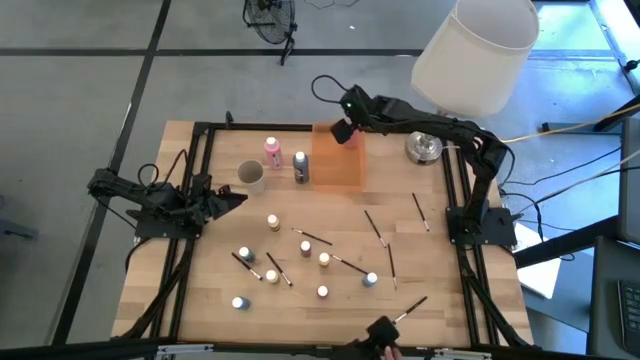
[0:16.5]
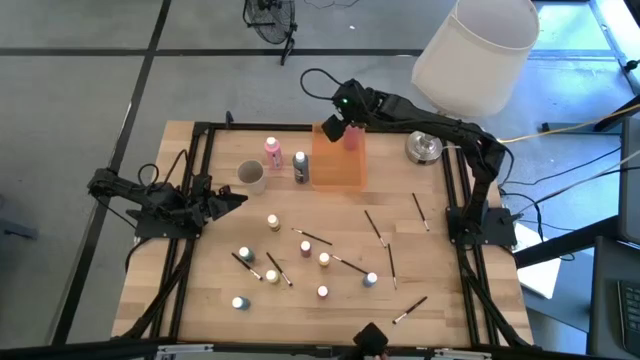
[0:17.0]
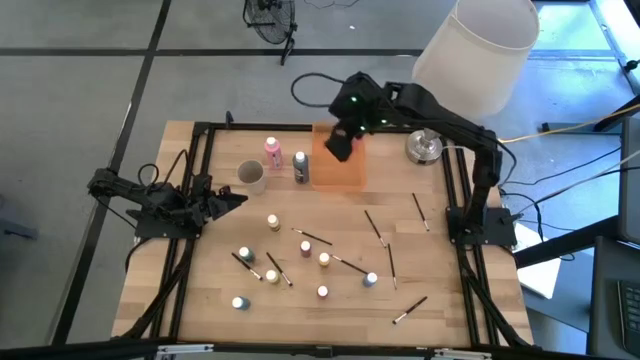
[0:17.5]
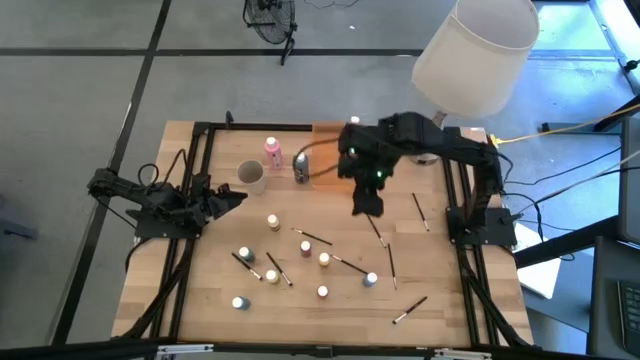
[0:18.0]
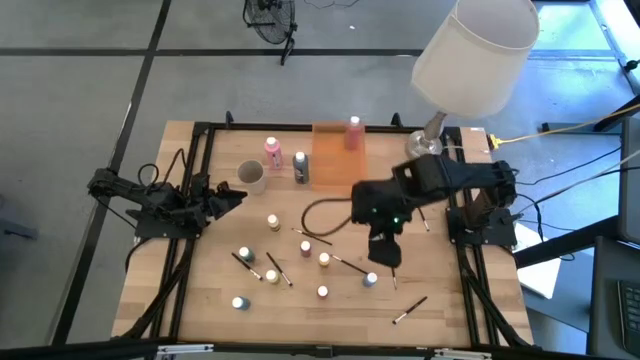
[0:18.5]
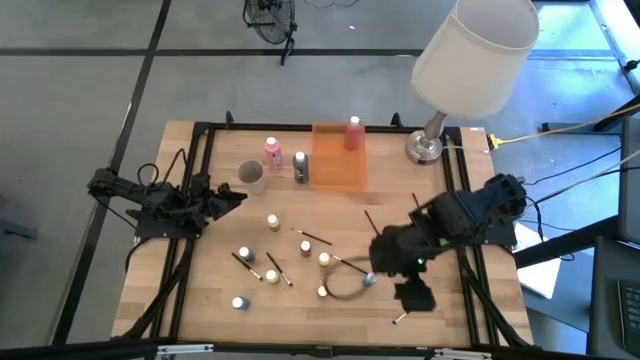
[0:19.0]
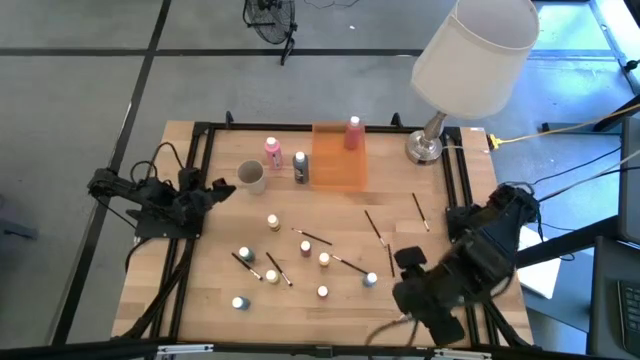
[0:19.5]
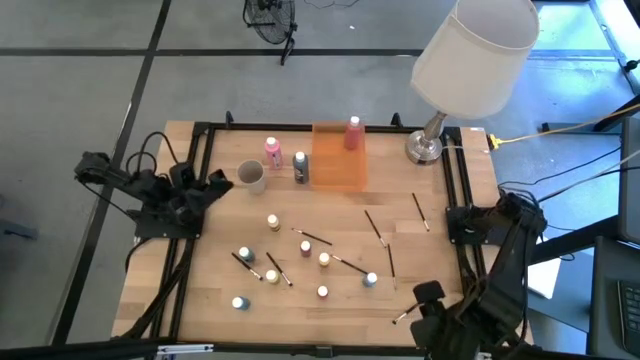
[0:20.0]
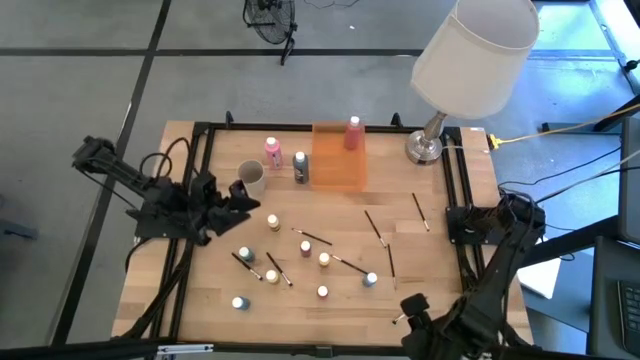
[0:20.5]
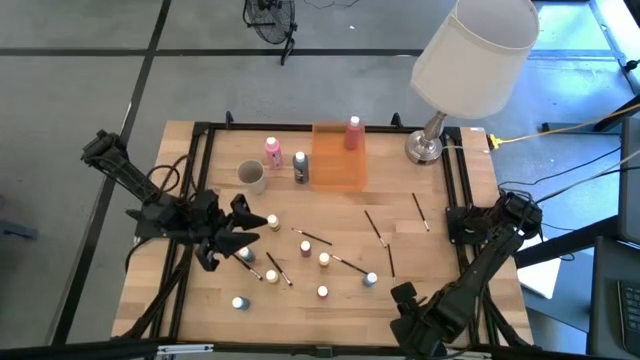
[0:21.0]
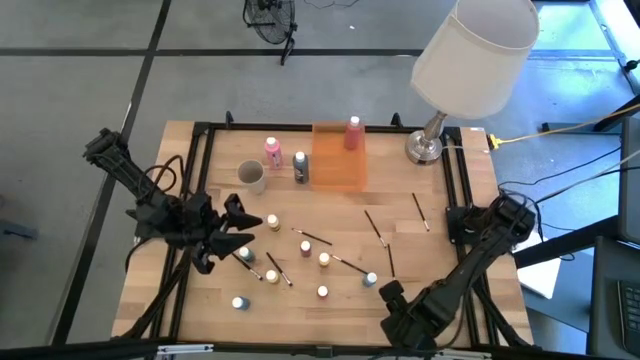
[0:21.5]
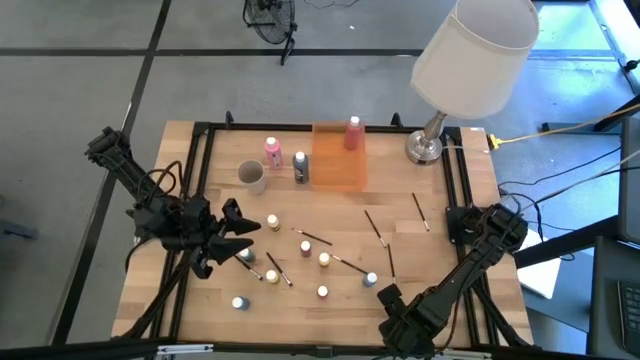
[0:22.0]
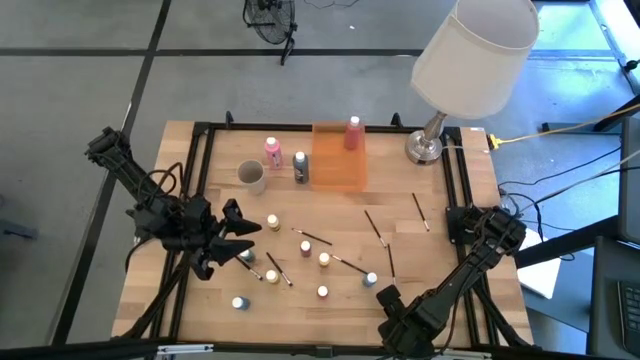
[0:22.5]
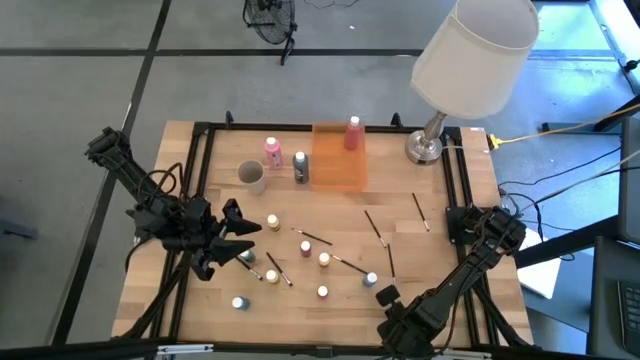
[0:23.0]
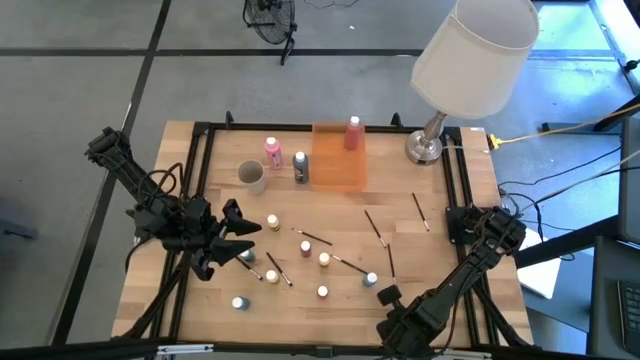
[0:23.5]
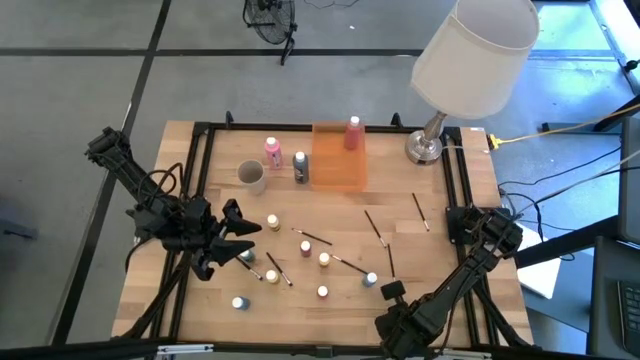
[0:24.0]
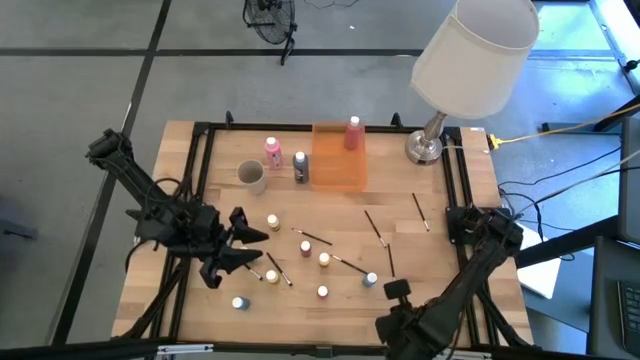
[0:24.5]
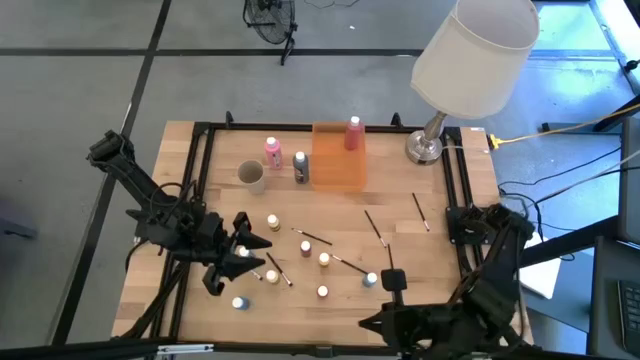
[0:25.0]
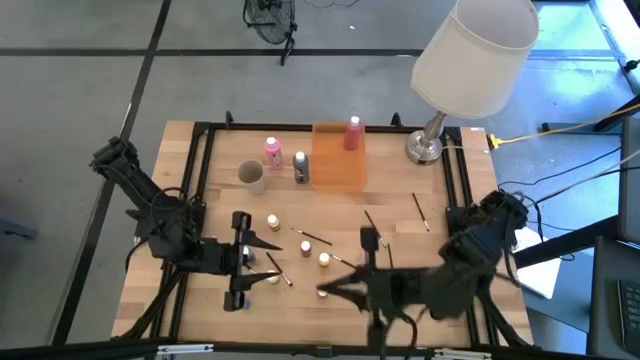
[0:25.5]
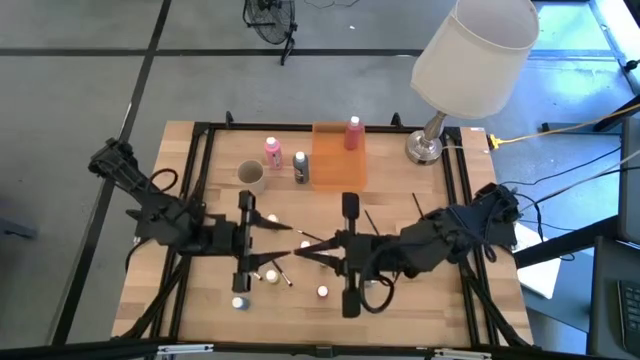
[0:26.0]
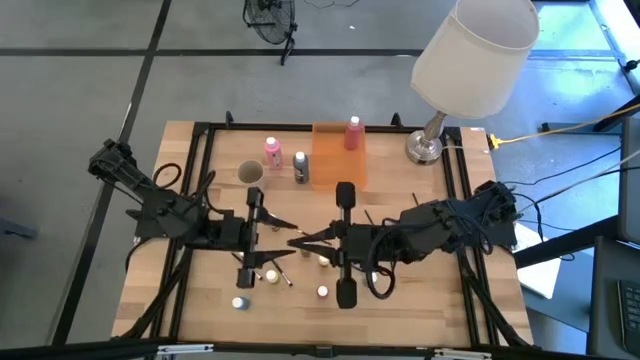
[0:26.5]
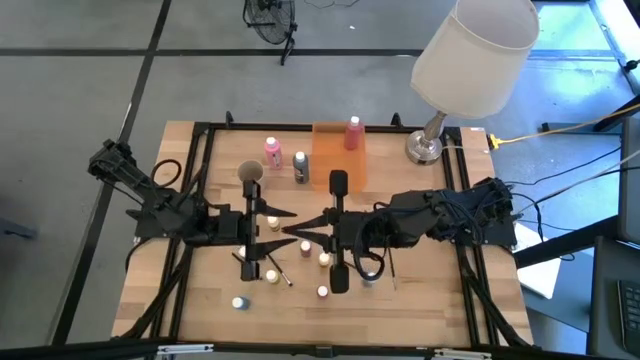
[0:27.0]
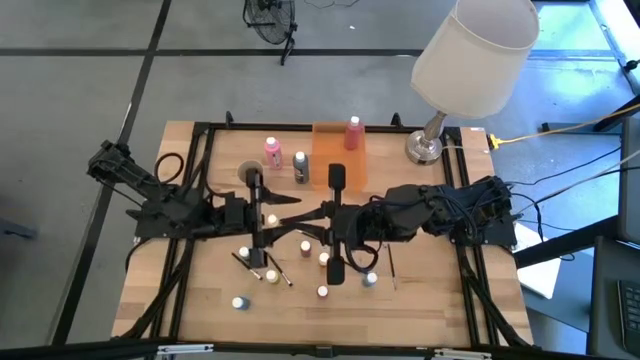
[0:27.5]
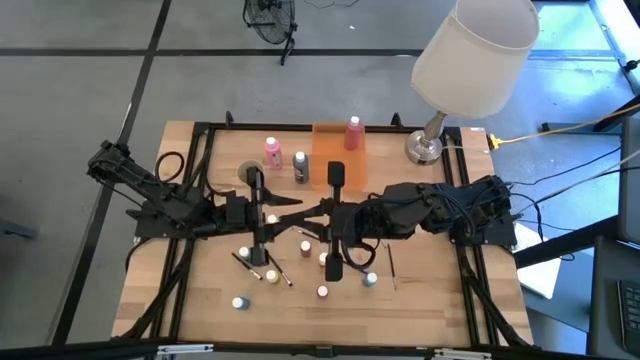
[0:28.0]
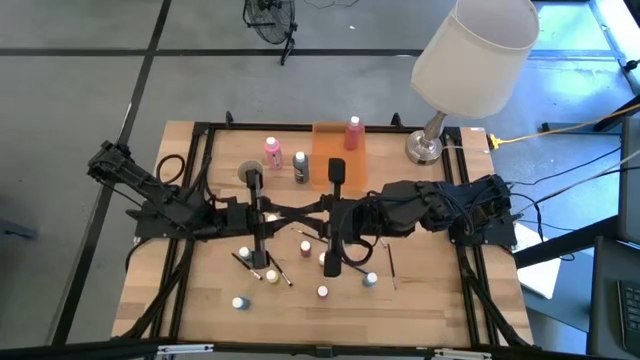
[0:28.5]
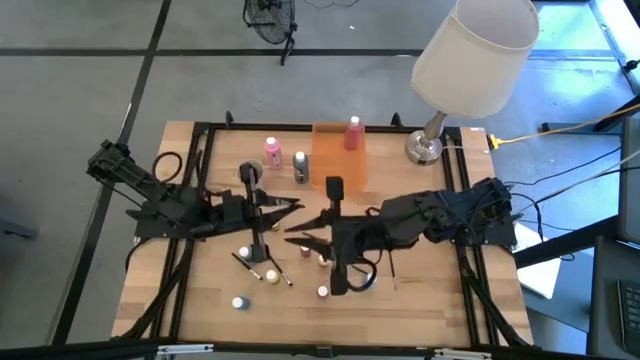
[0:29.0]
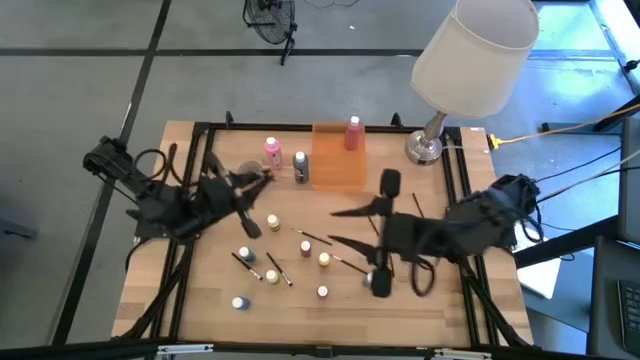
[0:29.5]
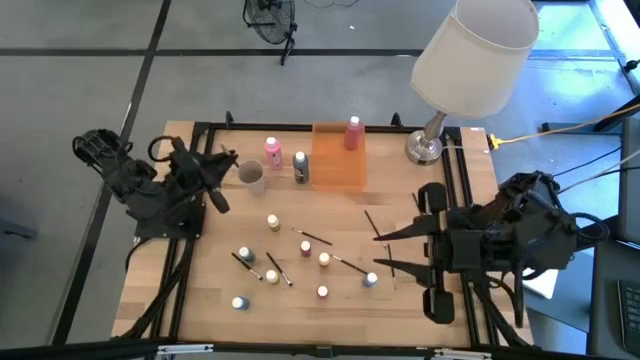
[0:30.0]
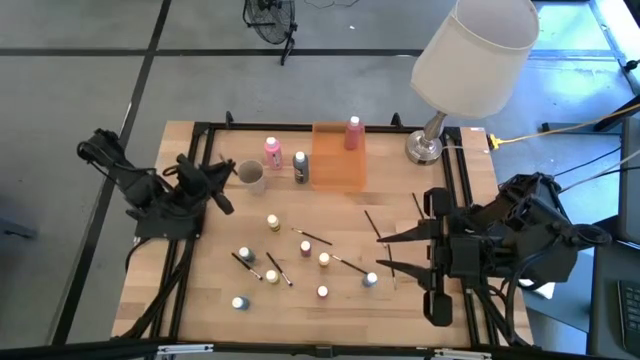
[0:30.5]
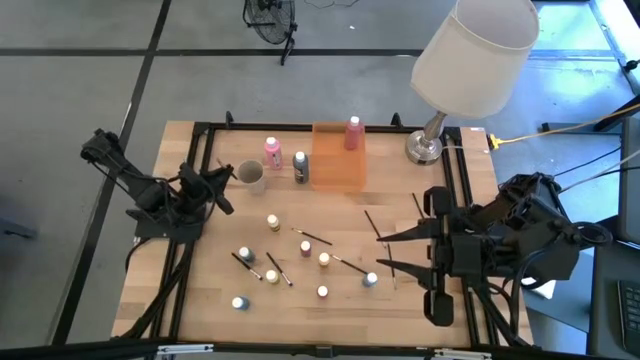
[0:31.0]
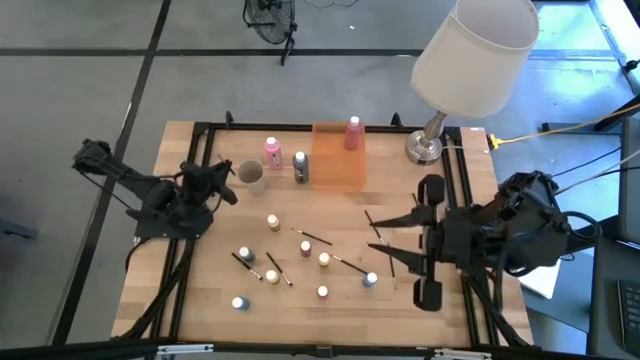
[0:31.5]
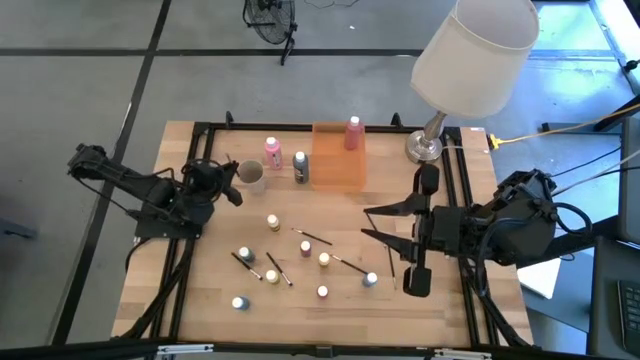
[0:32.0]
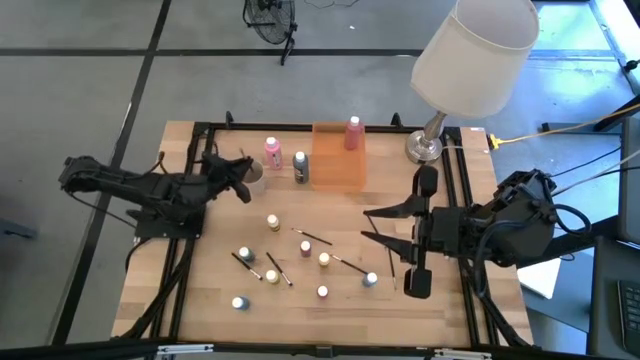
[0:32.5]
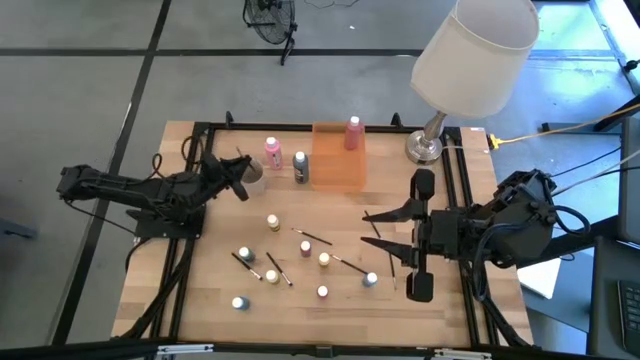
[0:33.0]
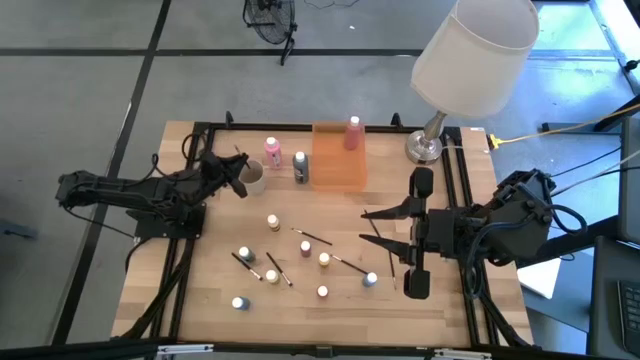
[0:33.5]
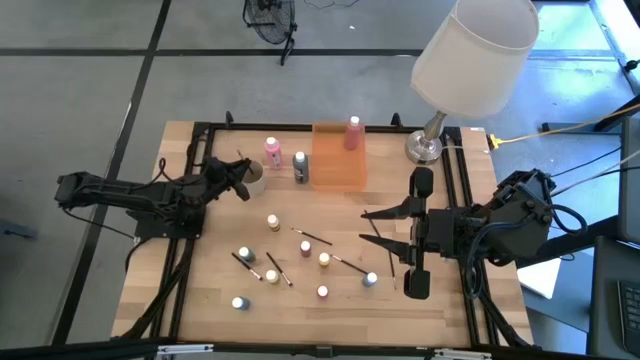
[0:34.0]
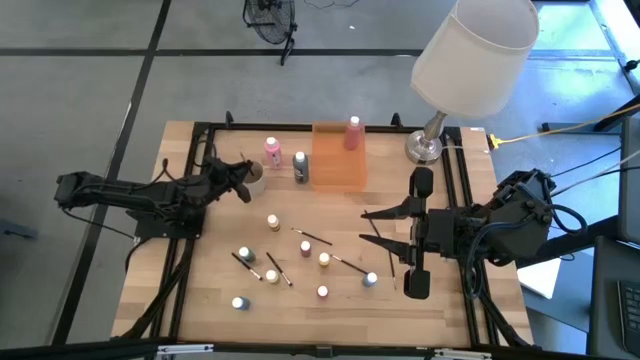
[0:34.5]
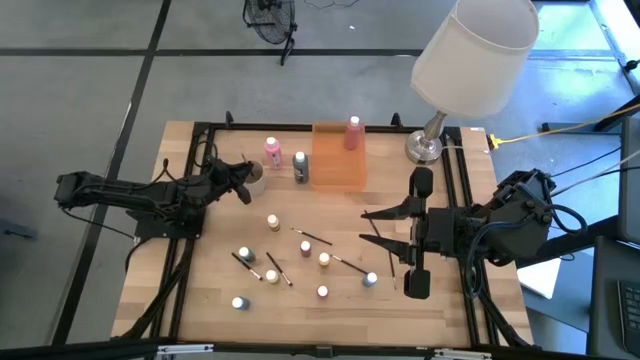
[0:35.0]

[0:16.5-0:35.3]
Task: Pick & Place Paint Supplies
Put the silver paint brush into the white cup
